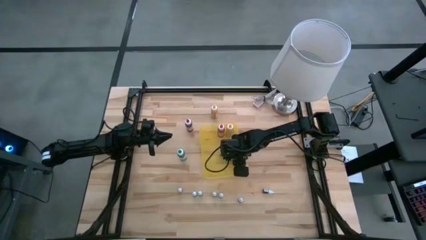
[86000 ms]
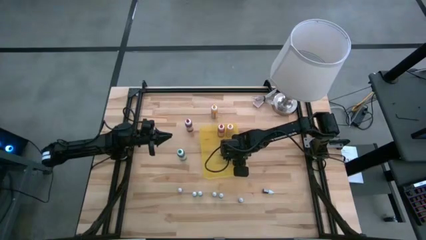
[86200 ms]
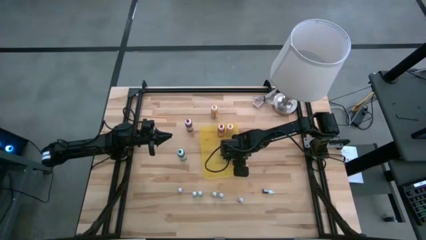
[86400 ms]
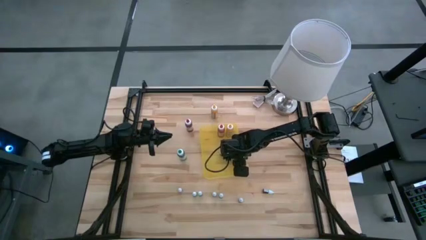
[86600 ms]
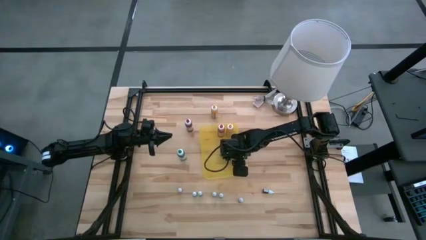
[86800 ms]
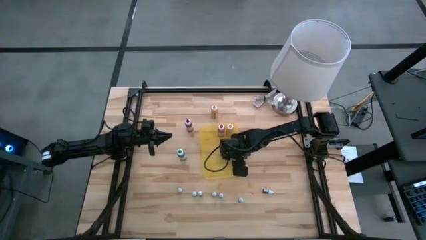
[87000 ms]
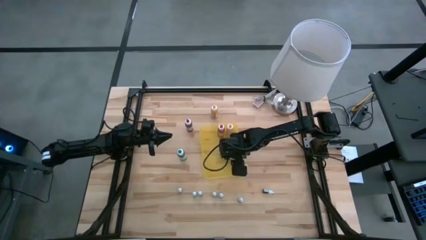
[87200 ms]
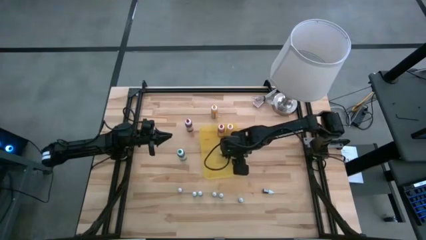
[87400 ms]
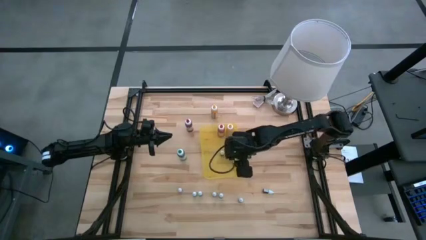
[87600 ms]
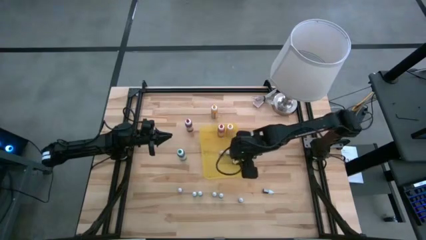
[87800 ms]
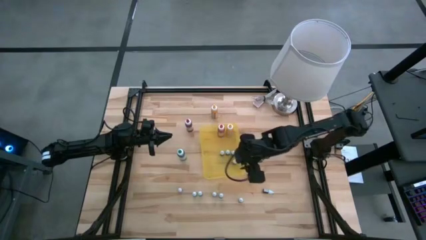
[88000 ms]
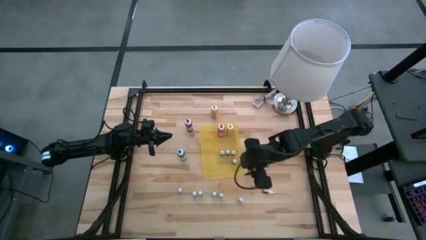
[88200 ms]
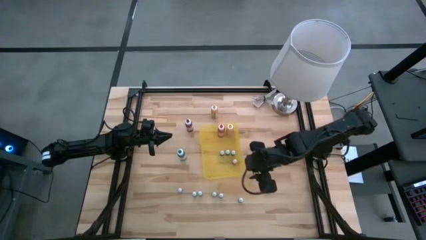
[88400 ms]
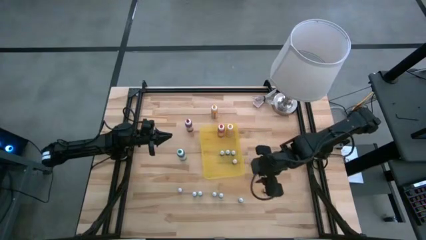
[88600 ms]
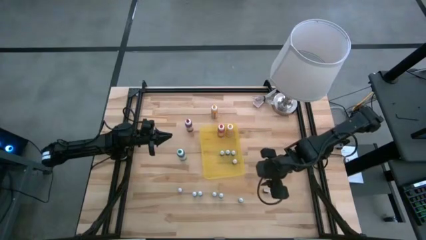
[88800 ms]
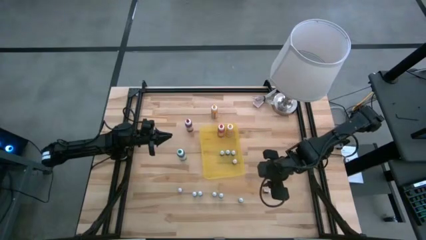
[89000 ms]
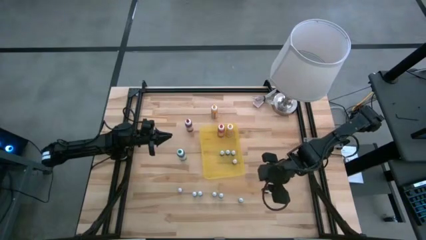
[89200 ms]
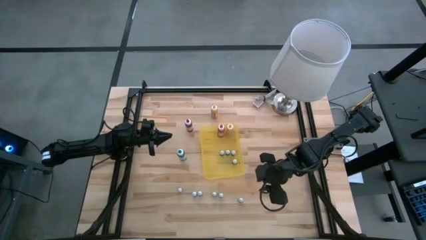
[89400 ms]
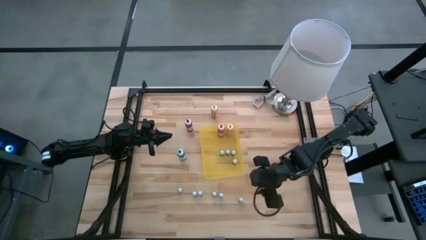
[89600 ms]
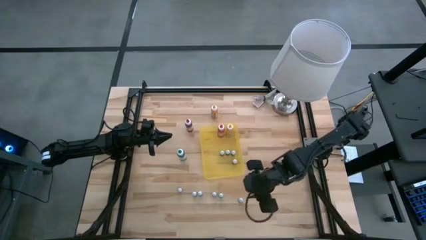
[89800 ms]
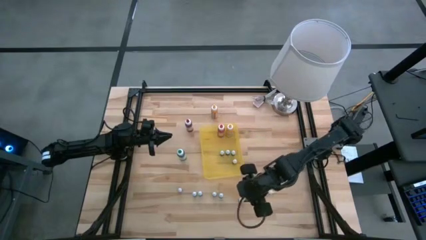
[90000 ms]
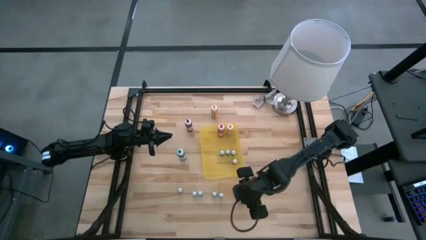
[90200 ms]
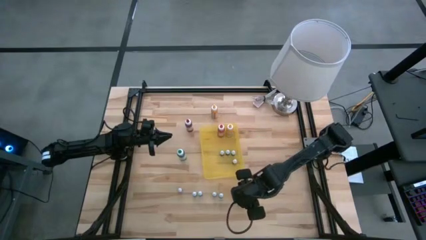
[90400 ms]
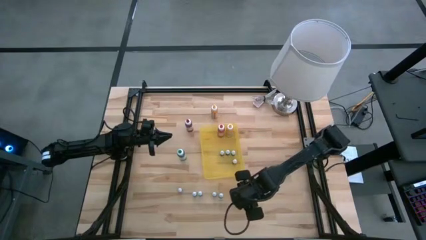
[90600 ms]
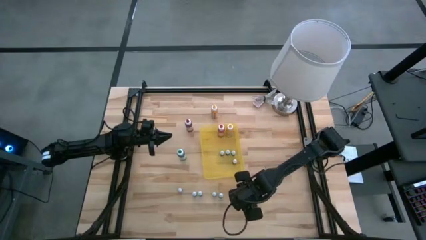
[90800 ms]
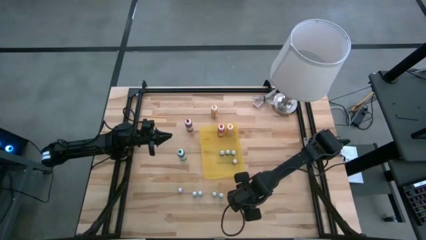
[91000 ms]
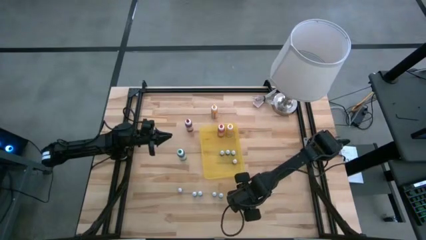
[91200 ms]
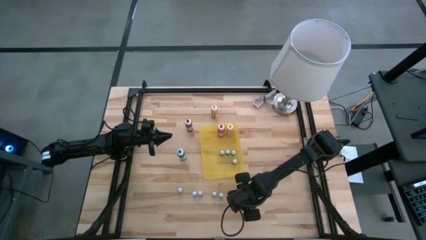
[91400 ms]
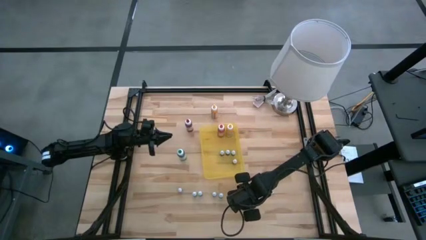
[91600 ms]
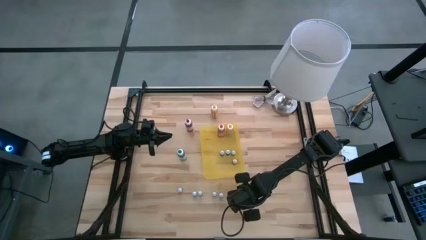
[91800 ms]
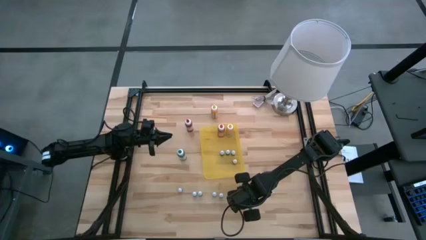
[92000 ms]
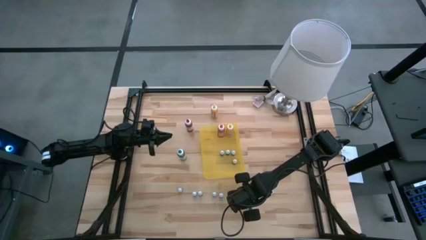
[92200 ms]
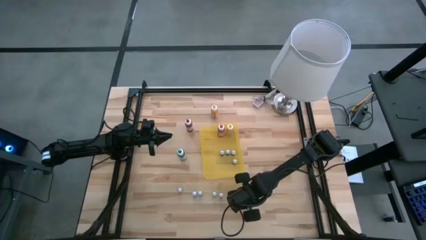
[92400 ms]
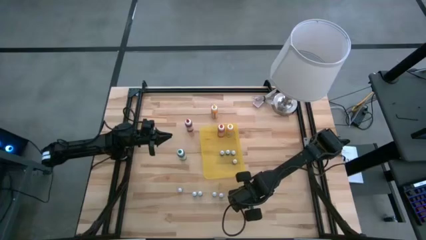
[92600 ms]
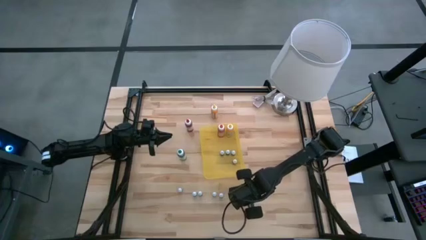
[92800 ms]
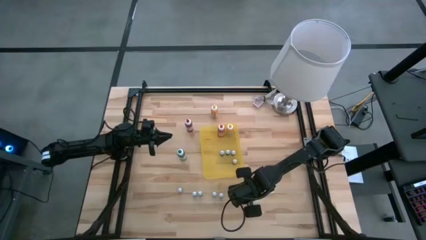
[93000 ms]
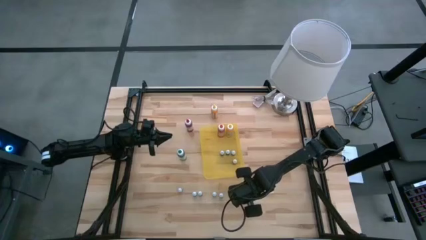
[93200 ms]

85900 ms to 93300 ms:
Task: Pick & Place food coloring
Put the right small black food coloring bottle into the bin

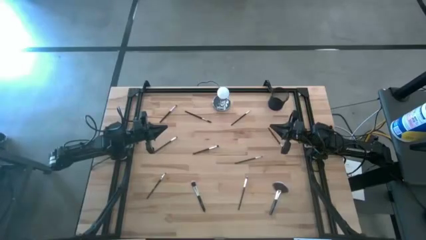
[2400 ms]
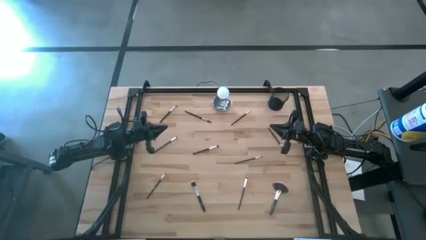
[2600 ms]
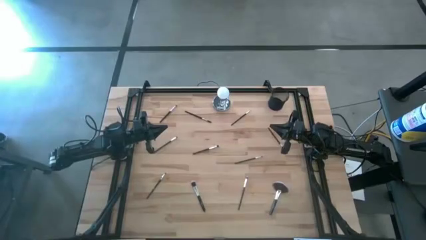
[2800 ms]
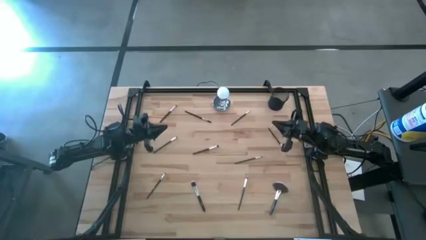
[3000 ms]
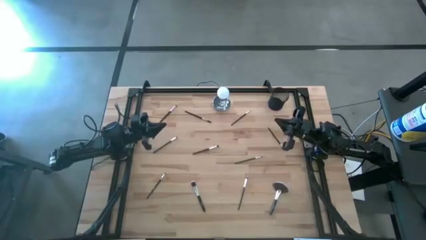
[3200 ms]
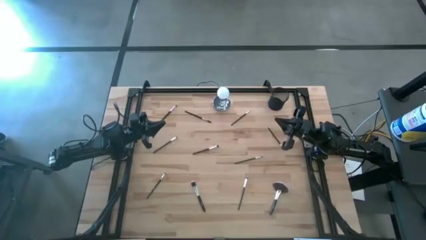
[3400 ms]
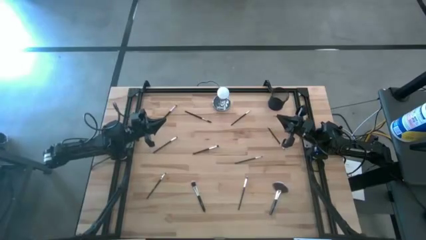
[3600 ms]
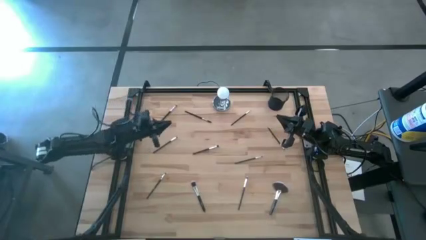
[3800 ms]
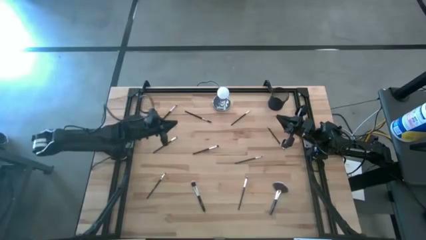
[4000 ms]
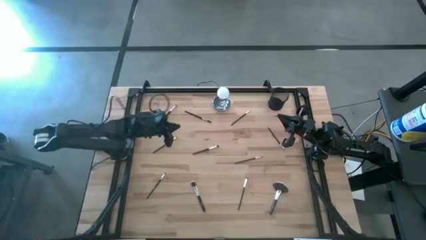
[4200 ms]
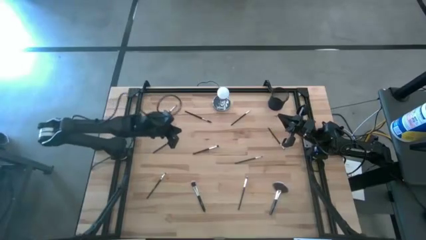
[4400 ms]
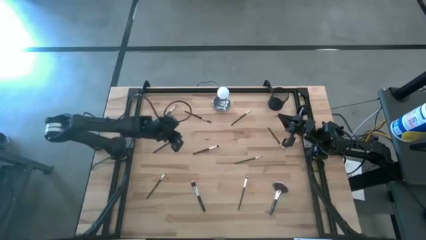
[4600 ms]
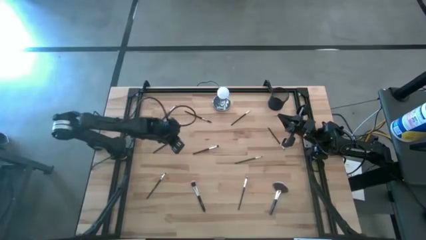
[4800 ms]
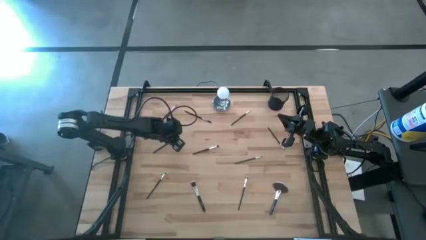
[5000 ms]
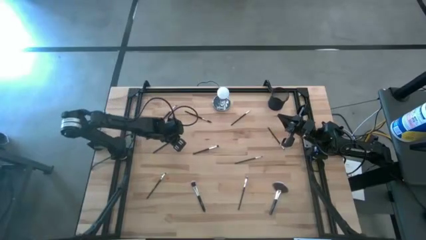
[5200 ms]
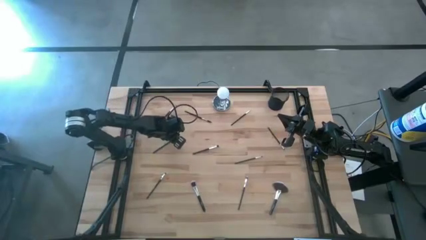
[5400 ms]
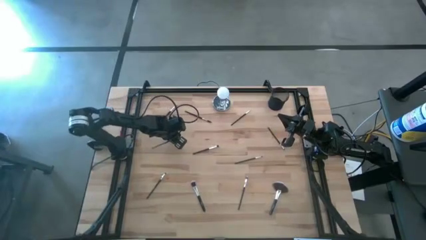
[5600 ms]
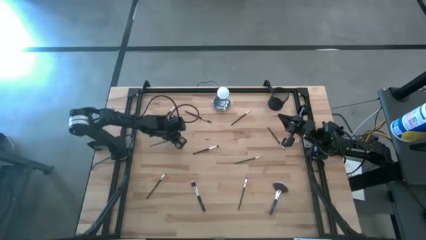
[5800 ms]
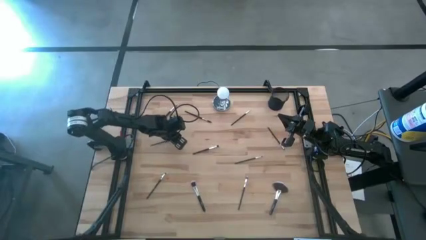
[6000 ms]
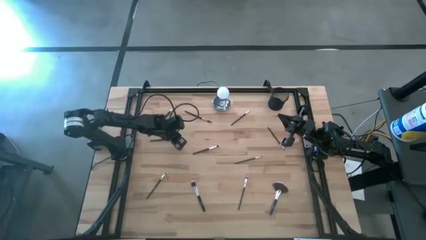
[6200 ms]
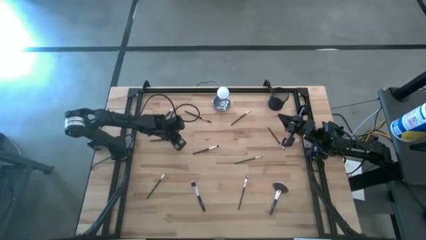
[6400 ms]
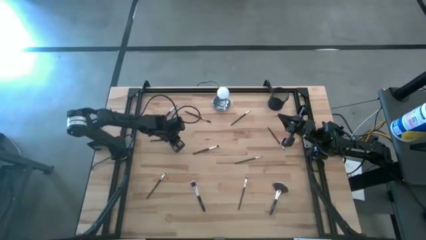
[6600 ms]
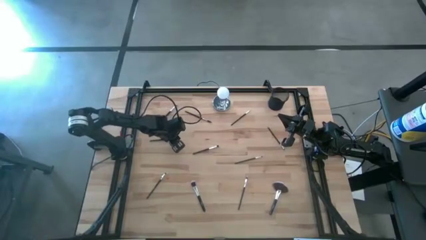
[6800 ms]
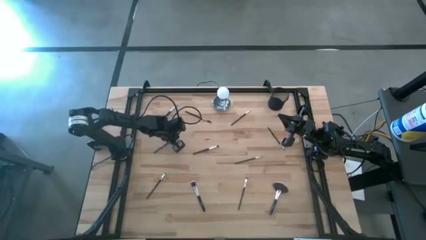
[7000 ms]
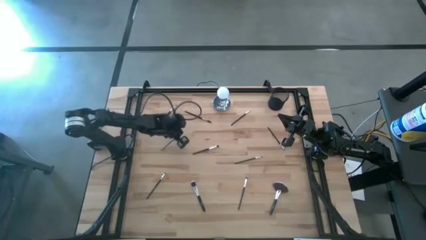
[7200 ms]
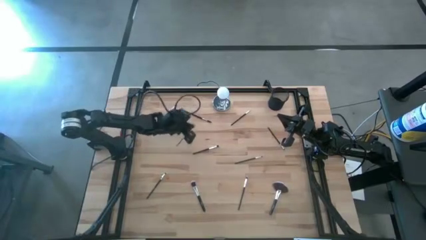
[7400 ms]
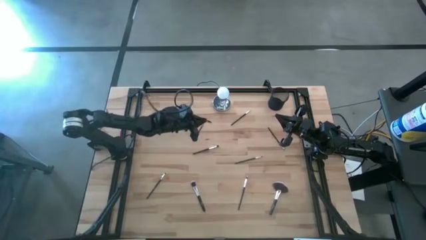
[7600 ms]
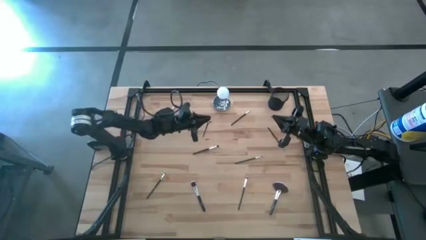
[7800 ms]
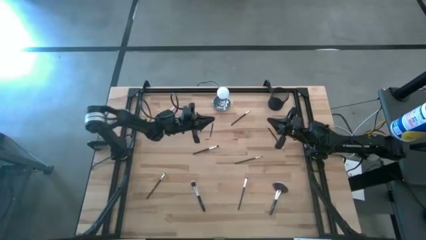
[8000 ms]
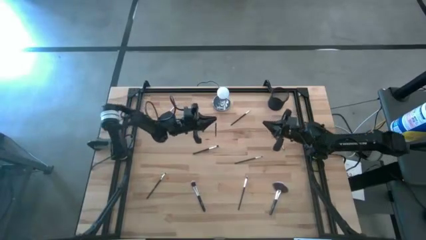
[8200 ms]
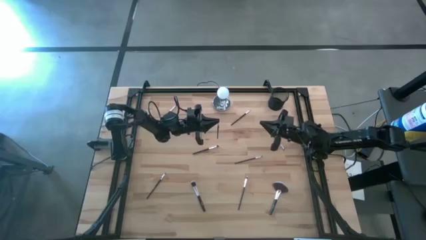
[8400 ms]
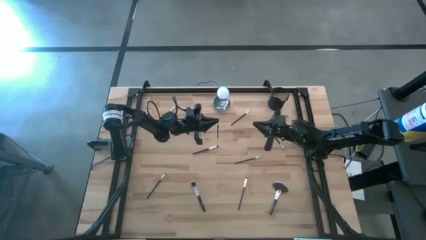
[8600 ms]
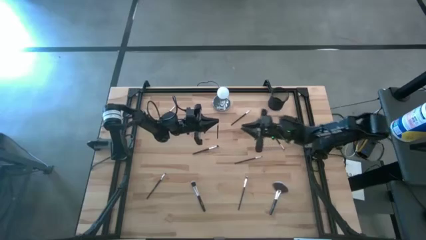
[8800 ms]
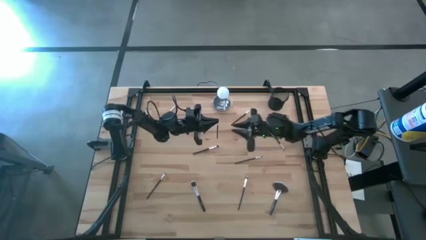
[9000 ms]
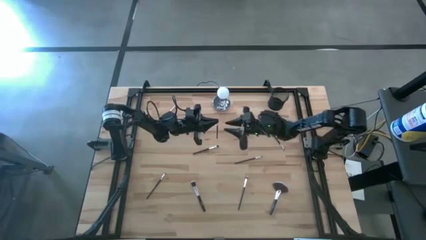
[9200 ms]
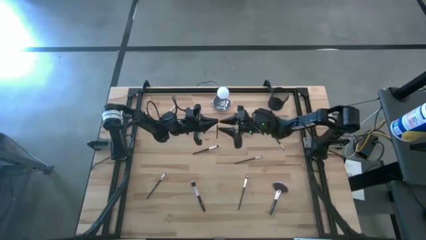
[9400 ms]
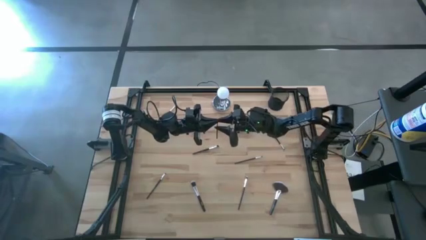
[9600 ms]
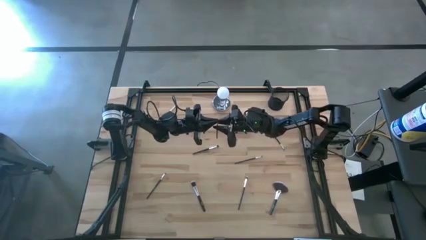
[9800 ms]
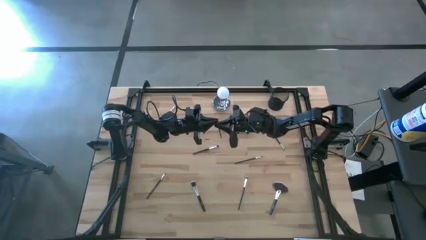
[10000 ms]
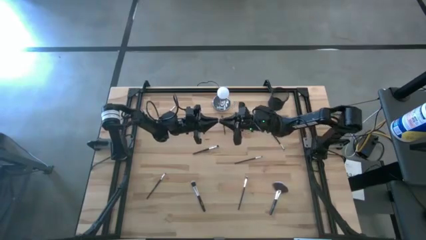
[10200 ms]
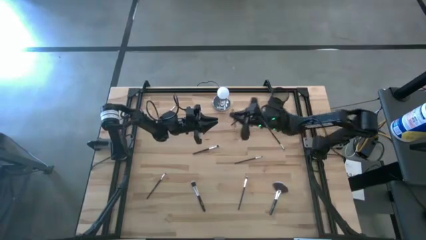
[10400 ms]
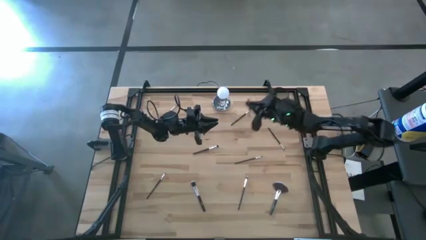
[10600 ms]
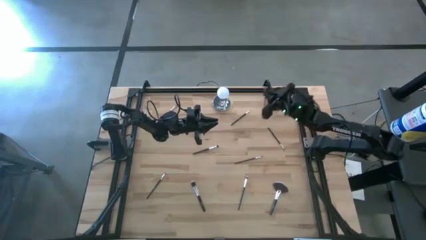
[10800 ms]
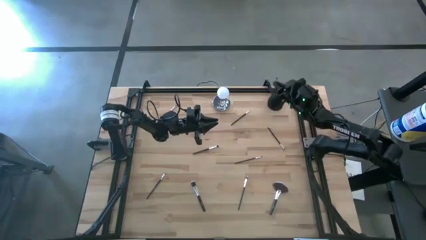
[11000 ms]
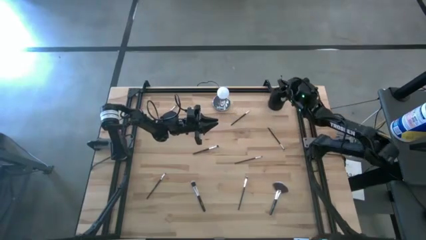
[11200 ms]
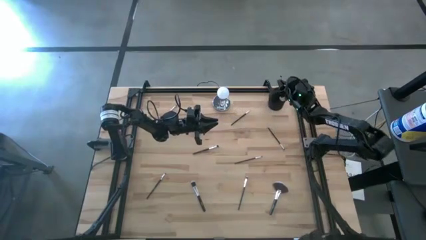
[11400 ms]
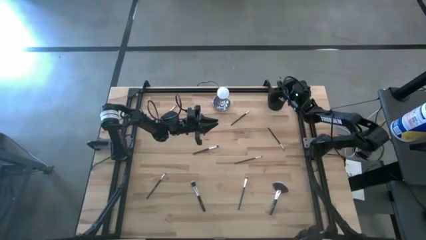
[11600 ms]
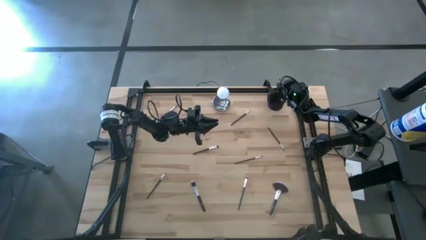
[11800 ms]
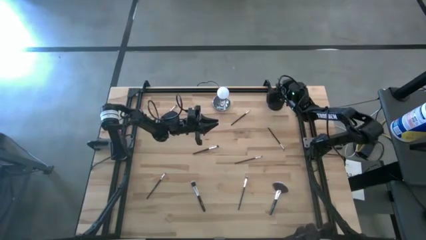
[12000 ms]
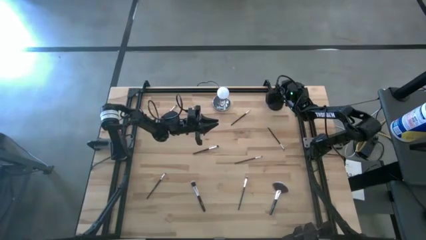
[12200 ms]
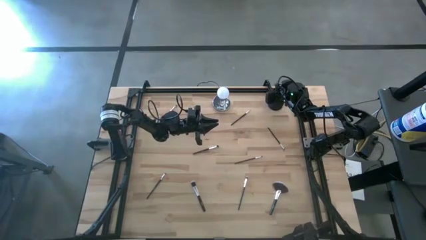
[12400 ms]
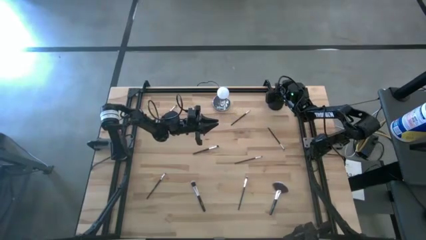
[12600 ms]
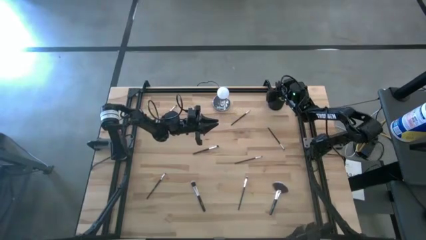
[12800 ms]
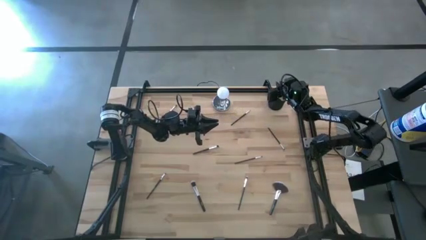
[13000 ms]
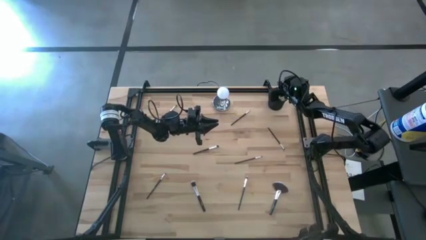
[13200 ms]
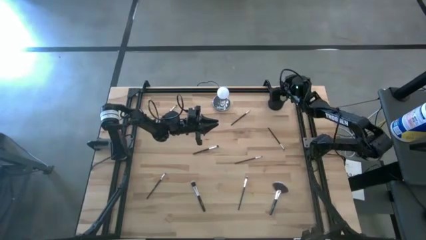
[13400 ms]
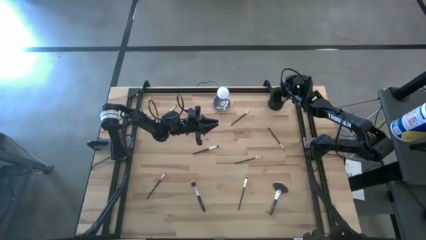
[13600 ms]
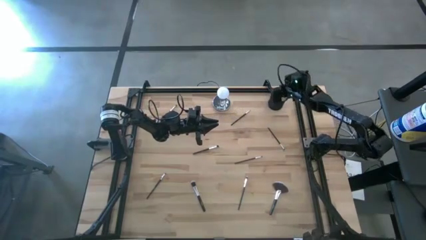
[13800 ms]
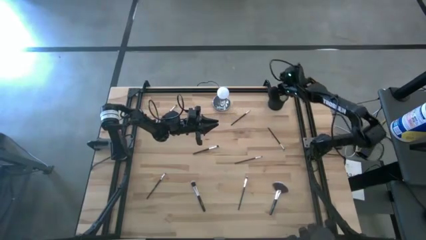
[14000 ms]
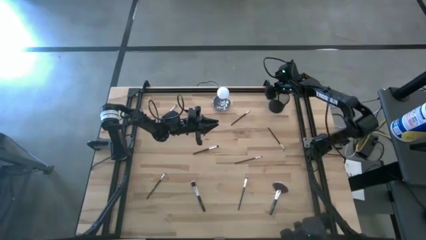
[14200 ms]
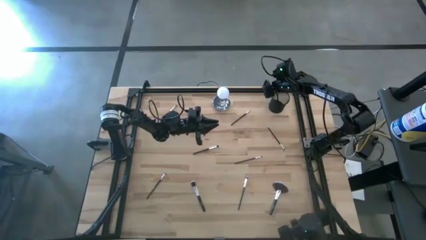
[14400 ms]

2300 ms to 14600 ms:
Task: Put items in baskets/containers
Put the black eyeshadow brush into the black pen holder
